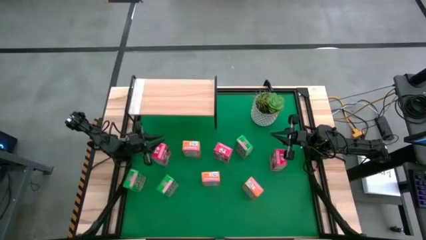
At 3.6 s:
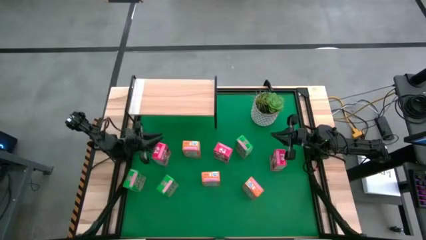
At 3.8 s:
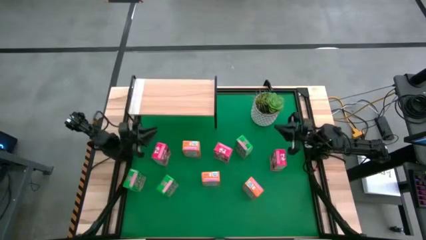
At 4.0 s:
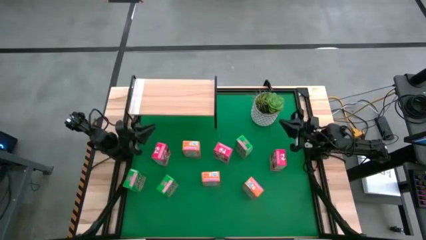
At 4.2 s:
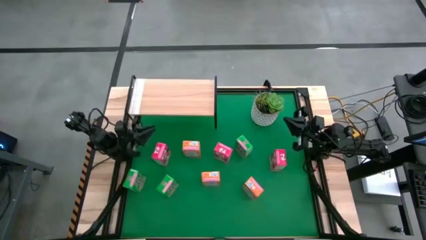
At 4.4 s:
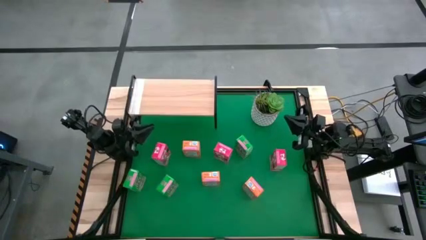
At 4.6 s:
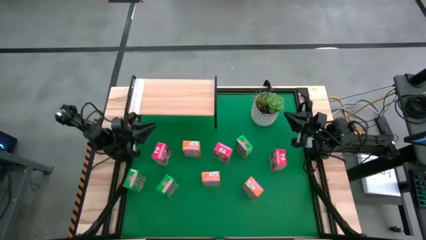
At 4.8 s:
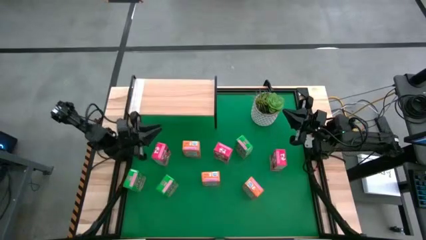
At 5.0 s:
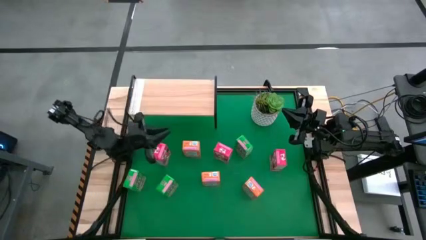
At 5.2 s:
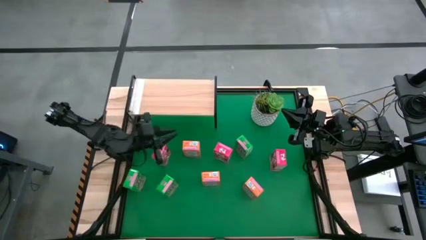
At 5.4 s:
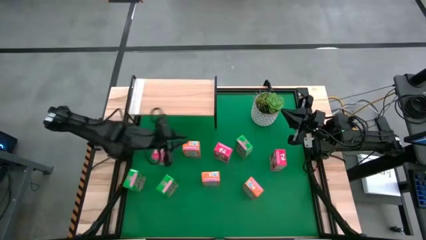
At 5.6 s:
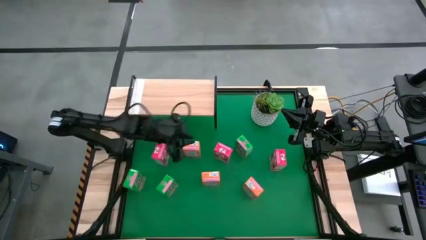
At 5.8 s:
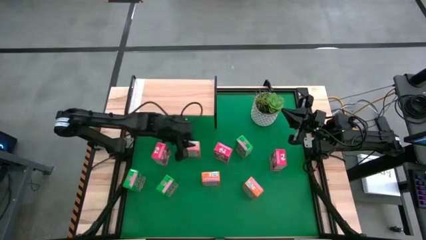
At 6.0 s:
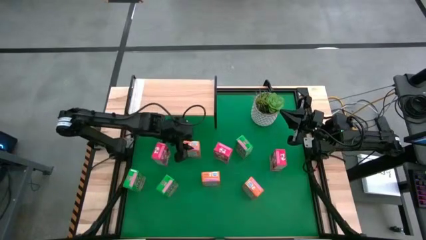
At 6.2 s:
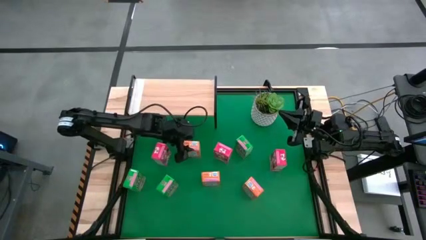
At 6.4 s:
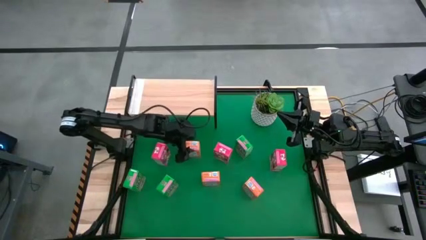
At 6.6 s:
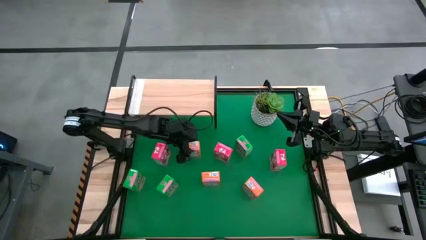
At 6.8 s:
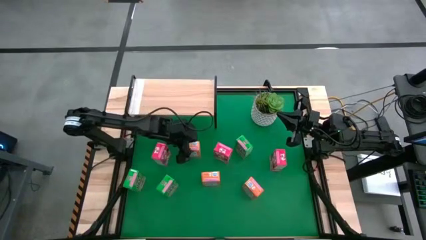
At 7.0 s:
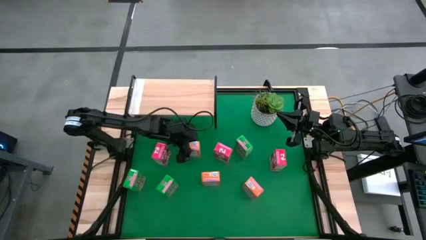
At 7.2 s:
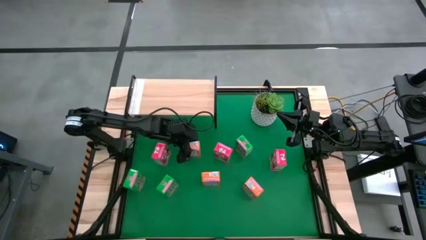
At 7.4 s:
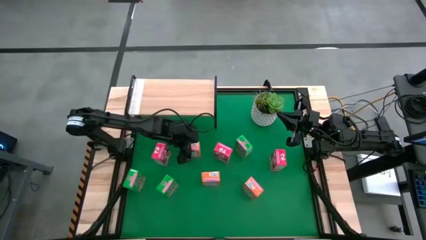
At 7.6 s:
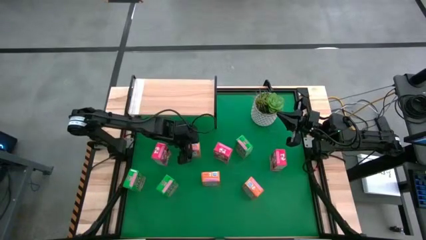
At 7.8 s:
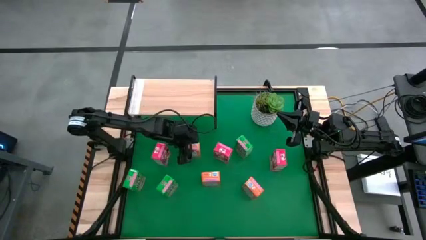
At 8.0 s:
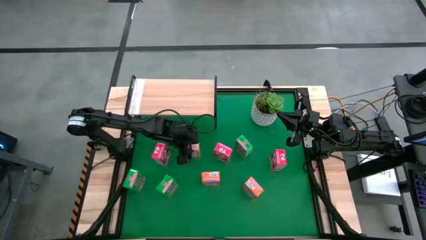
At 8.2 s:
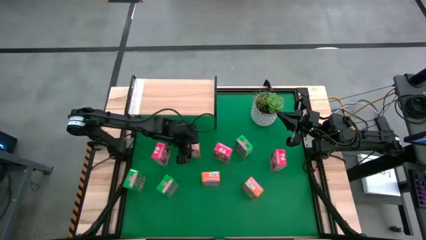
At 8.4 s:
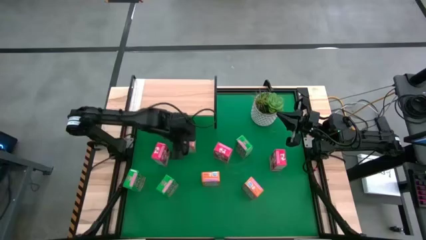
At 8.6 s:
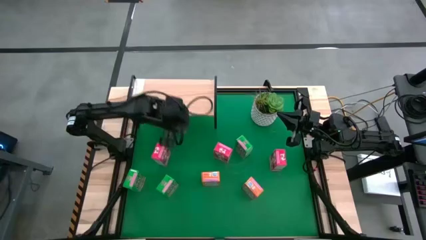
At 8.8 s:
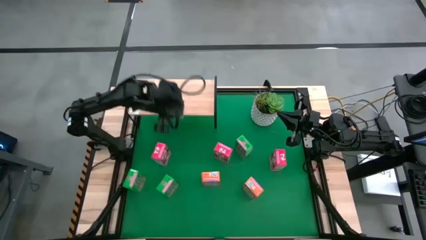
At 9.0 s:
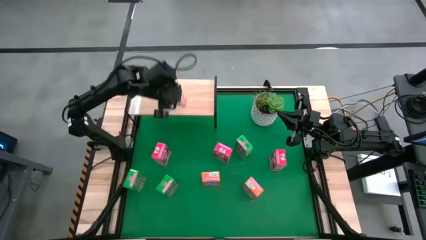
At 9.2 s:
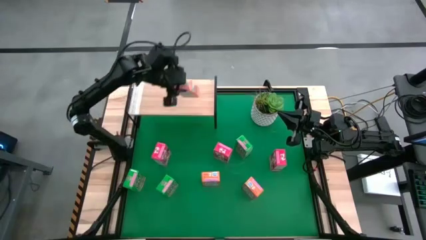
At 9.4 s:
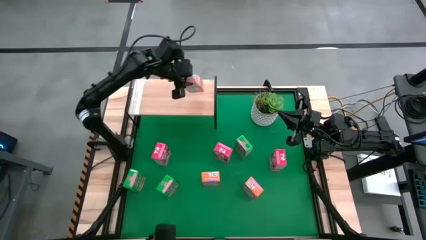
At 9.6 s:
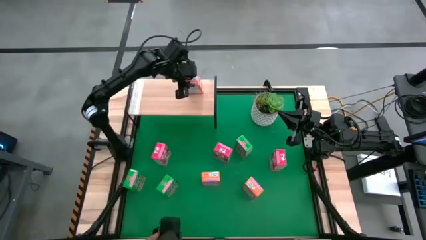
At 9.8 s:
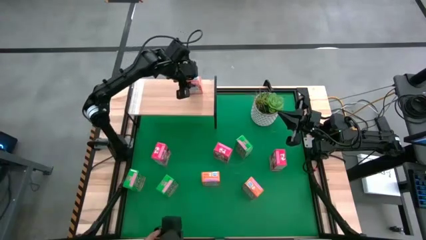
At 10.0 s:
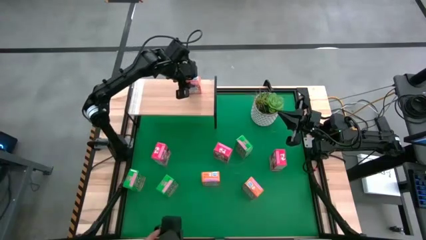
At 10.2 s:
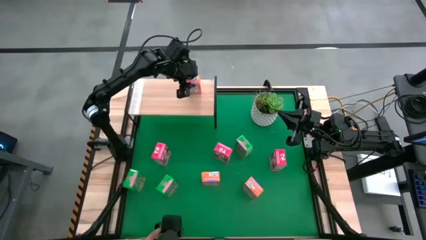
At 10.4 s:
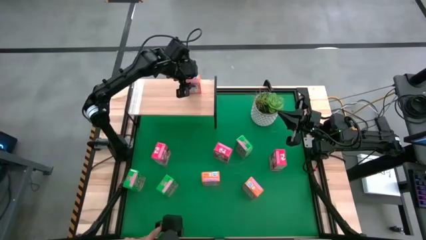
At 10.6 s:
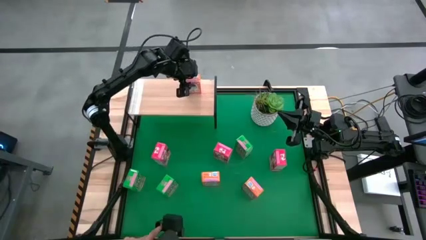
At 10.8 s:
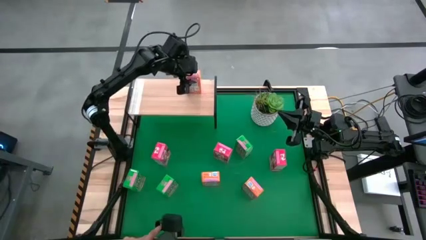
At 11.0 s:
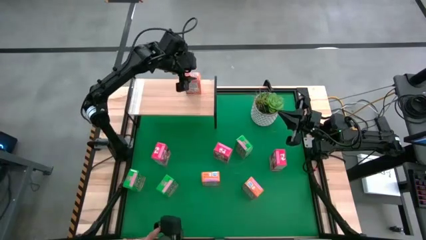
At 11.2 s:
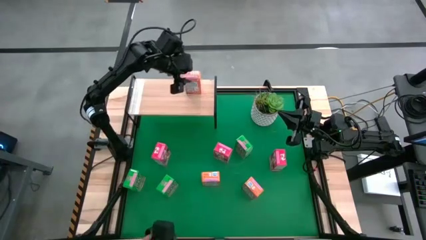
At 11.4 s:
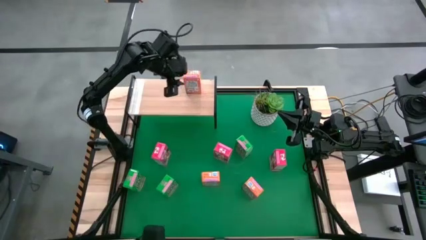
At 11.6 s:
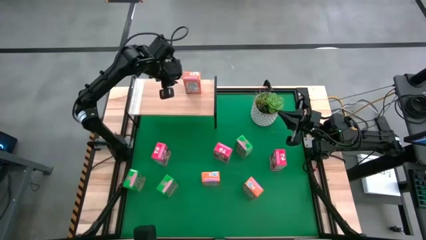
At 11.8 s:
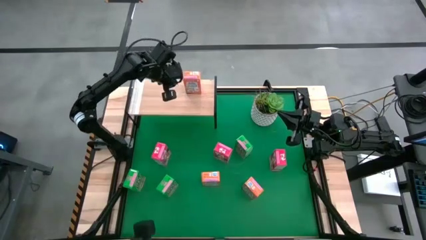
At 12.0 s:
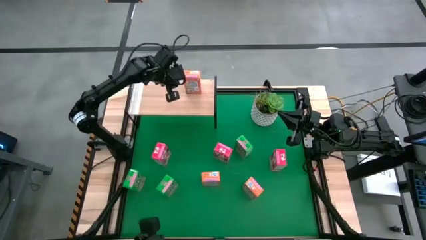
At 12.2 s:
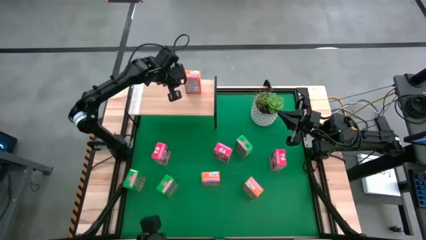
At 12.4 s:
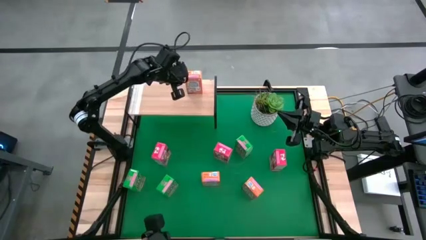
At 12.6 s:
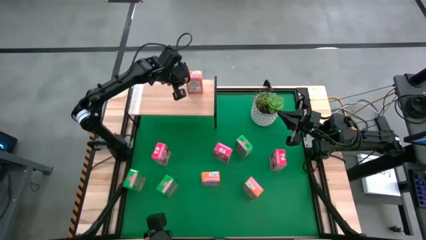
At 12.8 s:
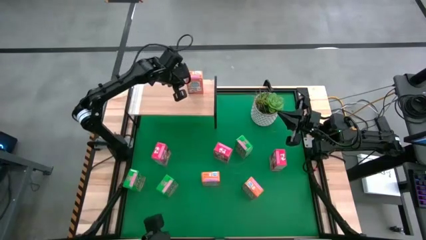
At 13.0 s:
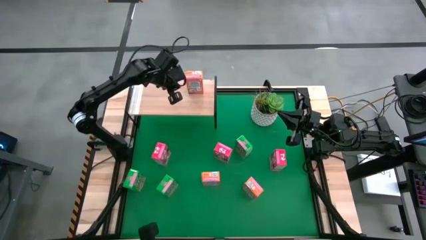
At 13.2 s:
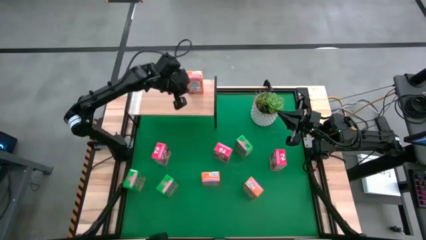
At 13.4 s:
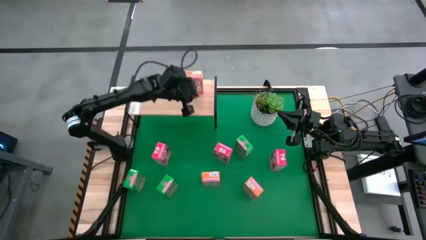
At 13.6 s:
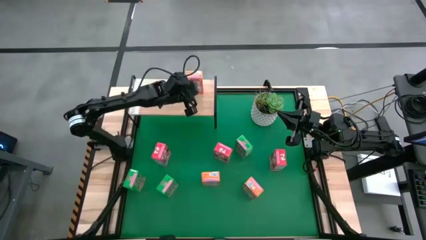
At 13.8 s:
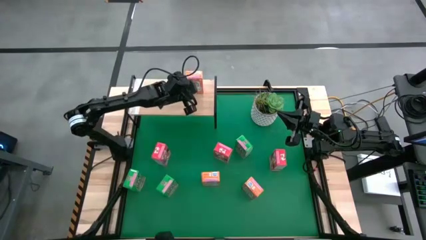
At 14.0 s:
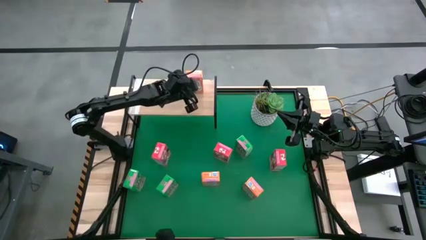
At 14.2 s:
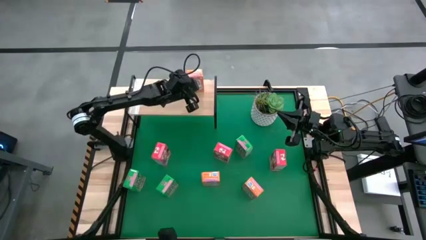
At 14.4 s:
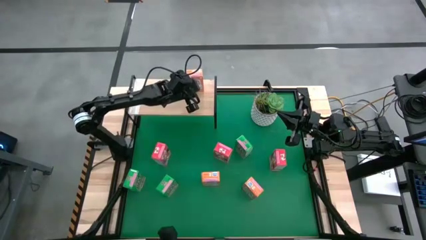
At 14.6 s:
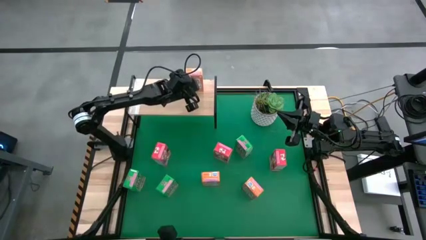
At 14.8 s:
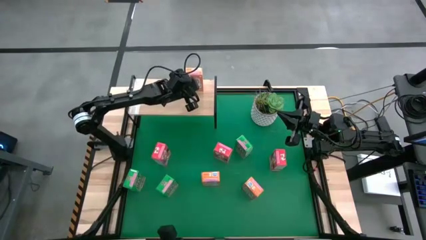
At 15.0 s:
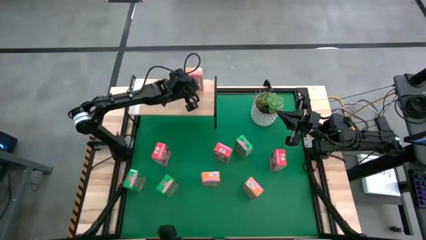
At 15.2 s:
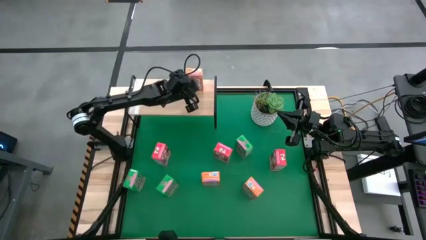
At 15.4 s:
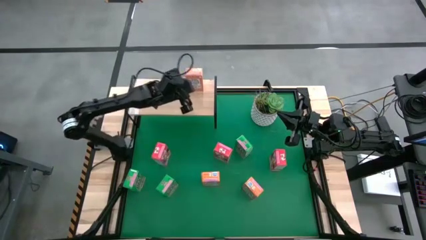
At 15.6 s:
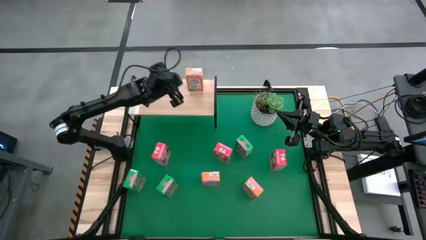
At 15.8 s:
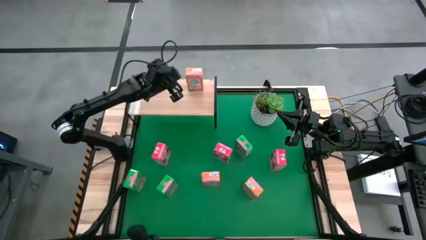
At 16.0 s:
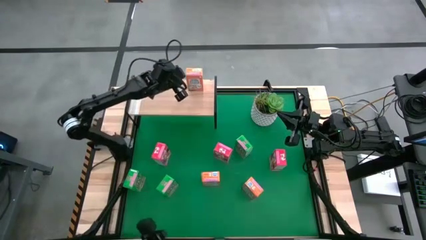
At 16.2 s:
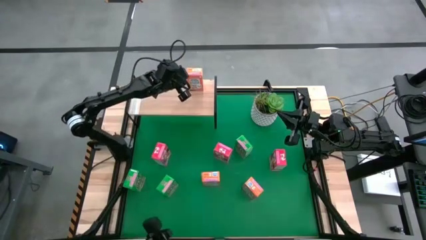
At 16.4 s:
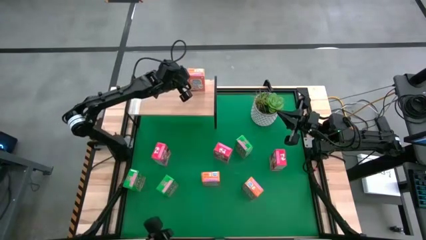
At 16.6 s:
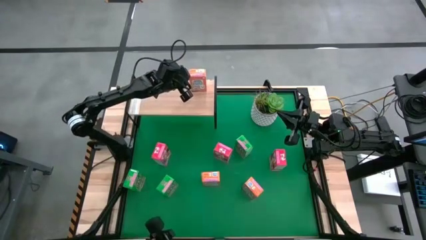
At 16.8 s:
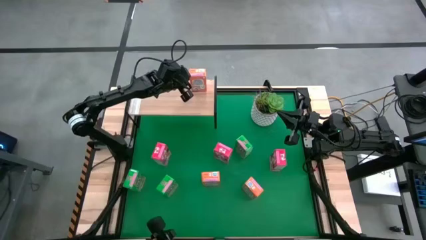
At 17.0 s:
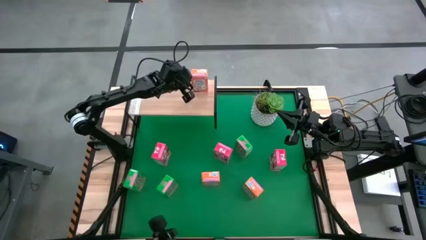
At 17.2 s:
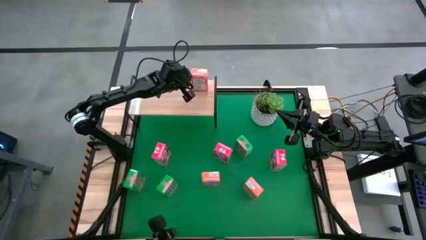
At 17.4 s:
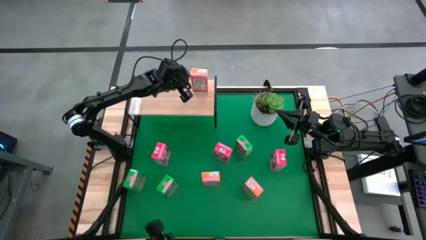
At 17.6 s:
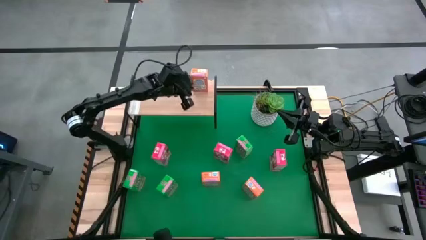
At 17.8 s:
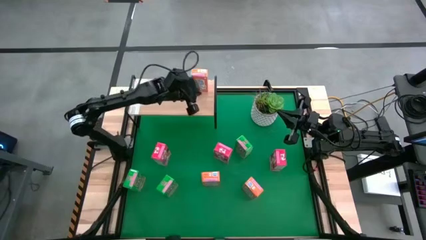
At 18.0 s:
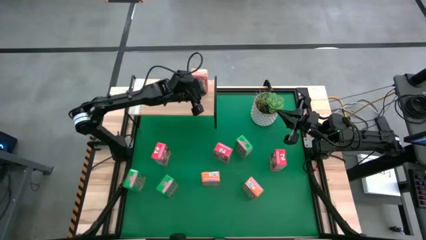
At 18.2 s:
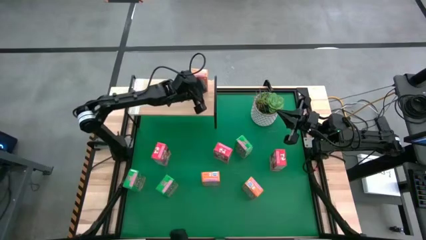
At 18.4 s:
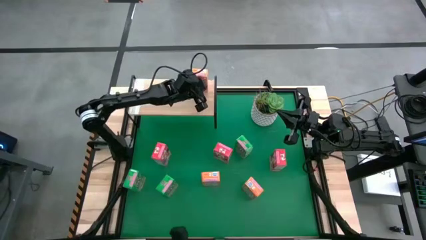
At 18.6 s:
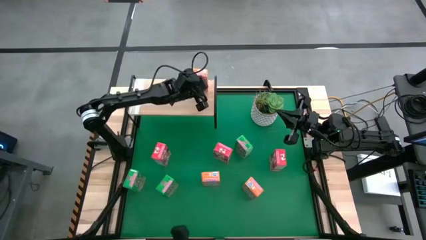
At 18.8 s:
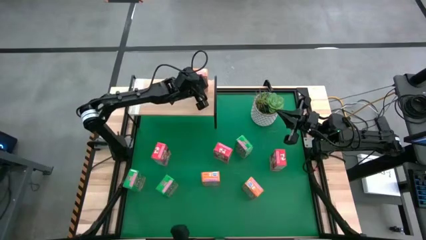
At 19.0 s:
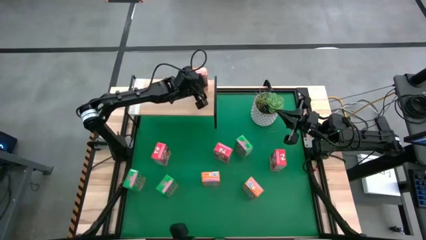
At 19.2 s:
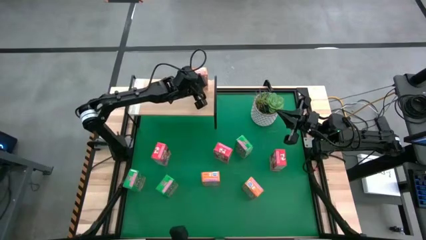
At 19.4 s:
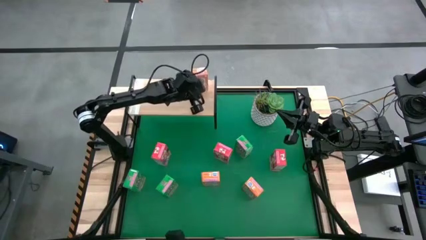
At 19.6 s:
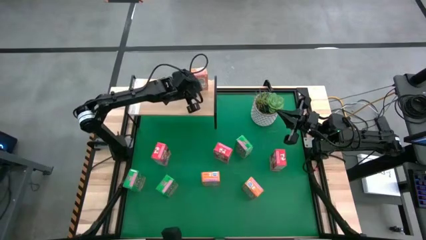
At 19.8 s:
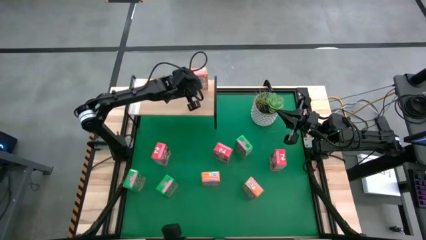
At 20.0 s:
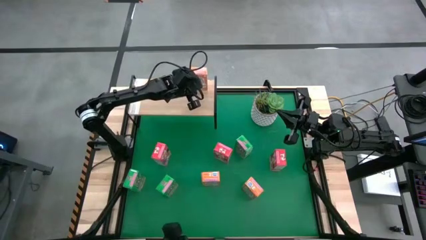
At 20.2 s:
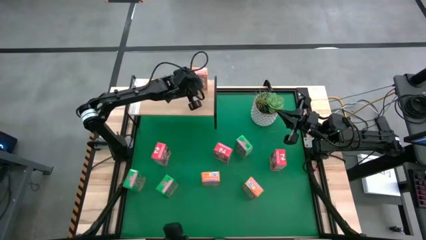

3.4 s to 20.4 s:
Task: Stack cereal on shelf
Put the top left orange cereal box on the shelf
